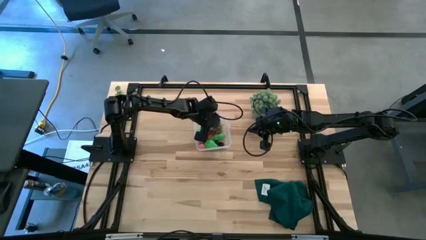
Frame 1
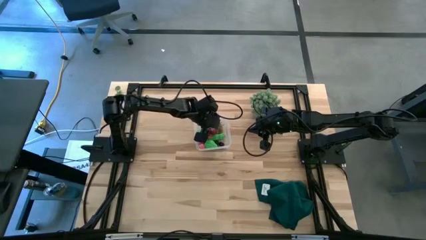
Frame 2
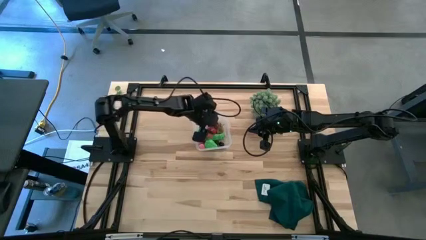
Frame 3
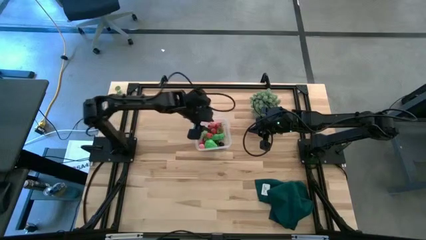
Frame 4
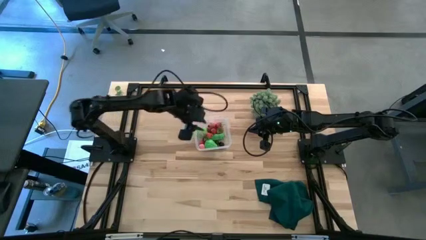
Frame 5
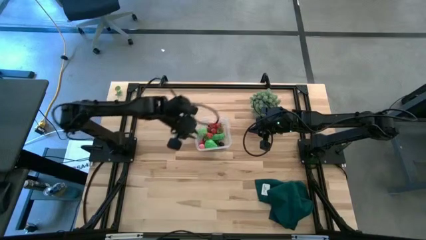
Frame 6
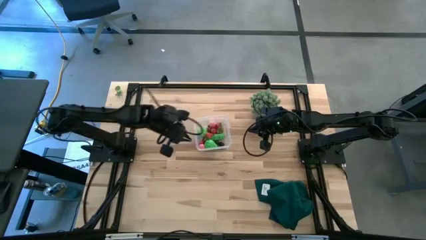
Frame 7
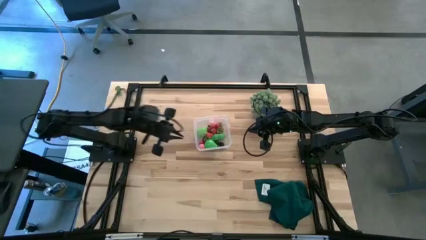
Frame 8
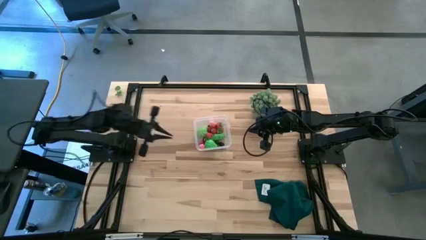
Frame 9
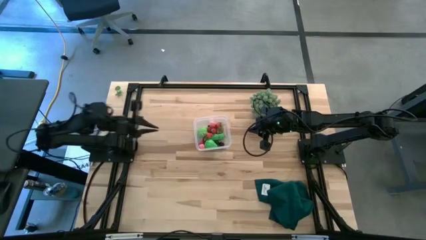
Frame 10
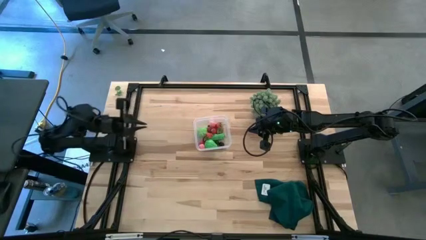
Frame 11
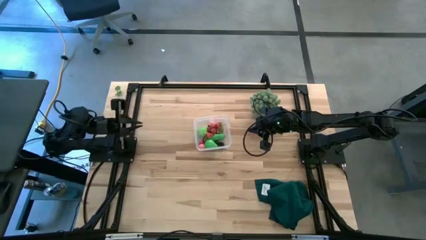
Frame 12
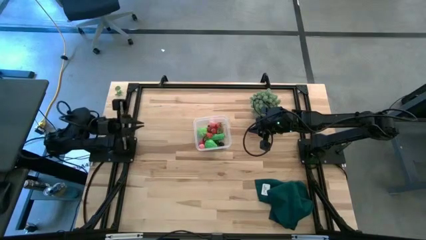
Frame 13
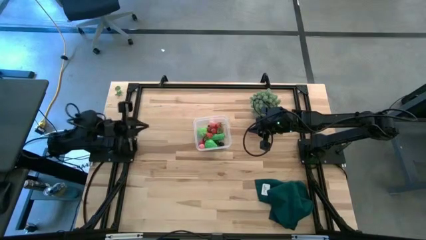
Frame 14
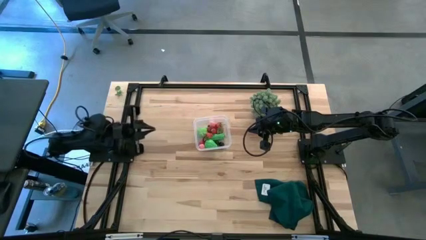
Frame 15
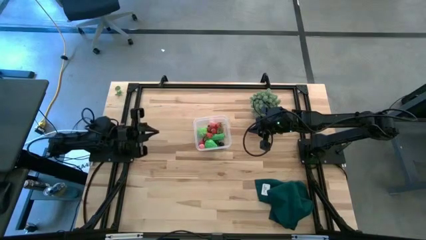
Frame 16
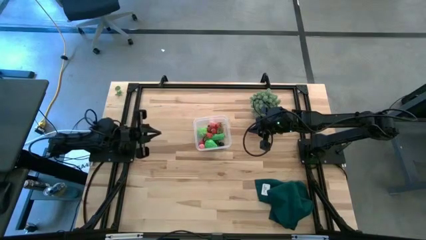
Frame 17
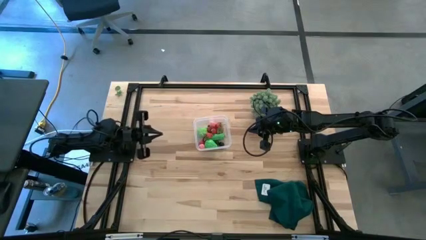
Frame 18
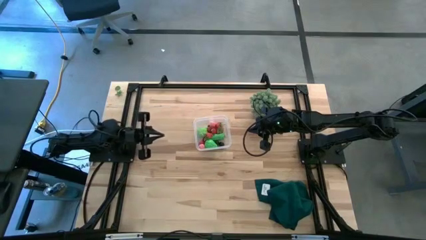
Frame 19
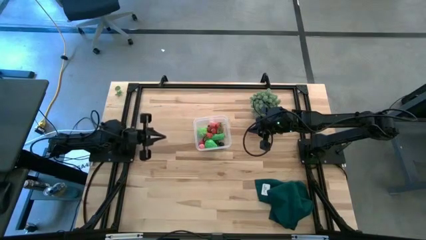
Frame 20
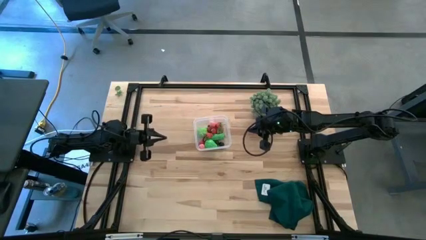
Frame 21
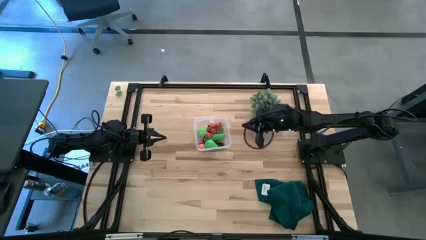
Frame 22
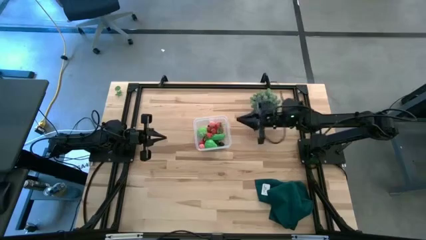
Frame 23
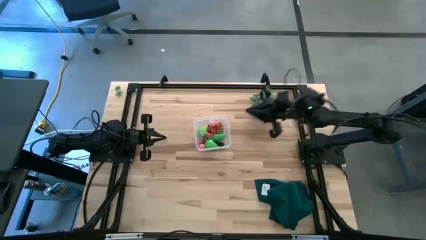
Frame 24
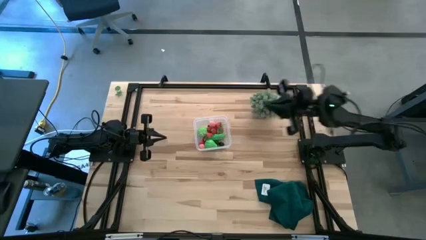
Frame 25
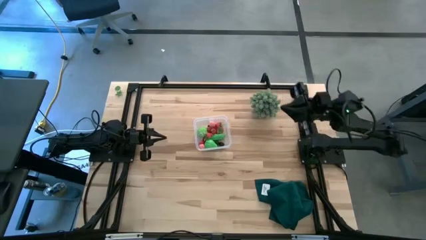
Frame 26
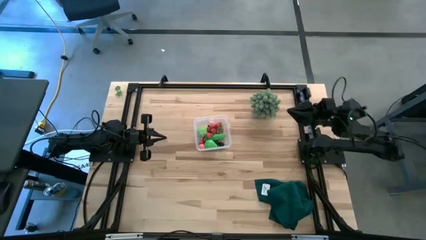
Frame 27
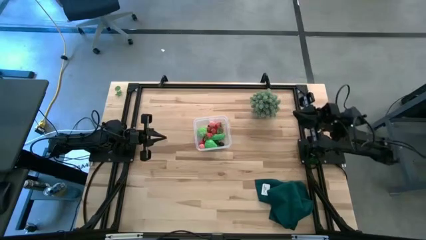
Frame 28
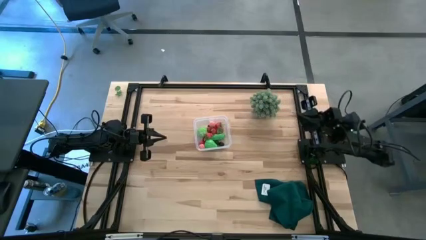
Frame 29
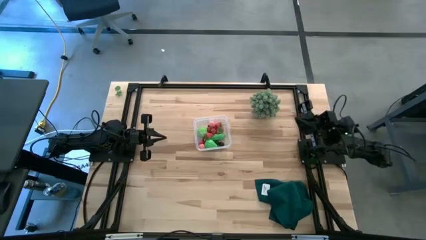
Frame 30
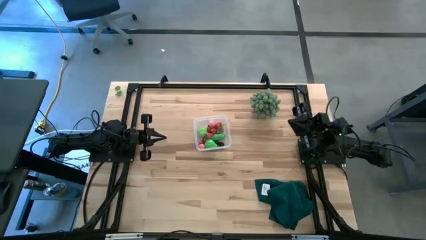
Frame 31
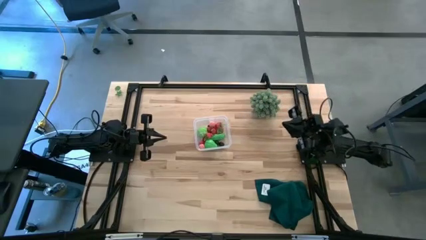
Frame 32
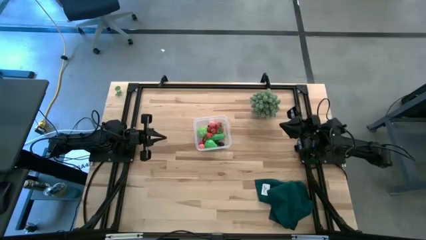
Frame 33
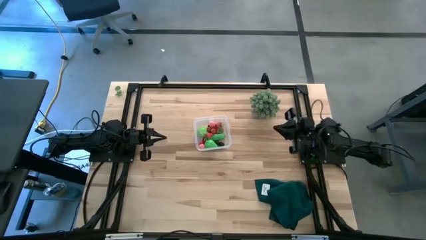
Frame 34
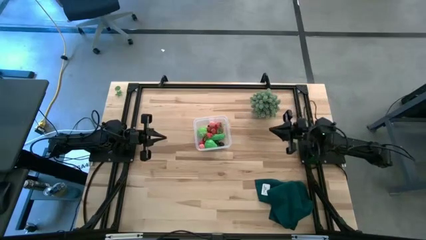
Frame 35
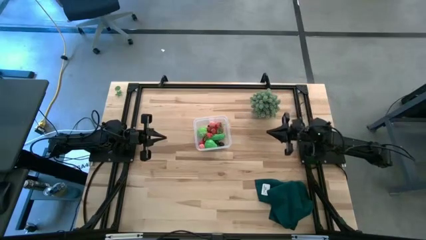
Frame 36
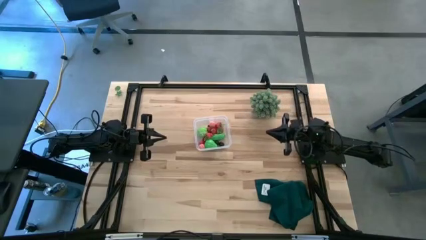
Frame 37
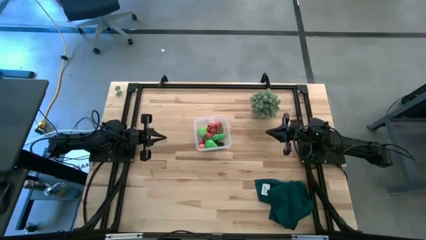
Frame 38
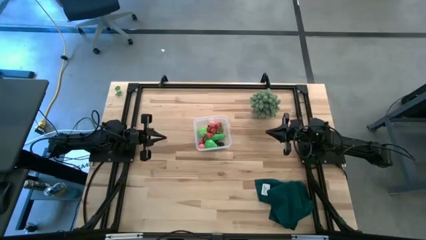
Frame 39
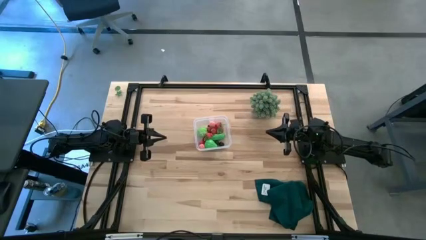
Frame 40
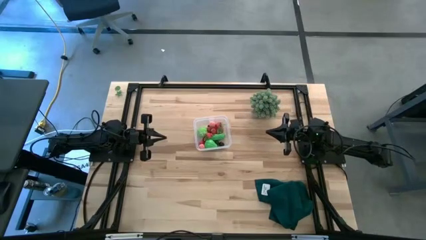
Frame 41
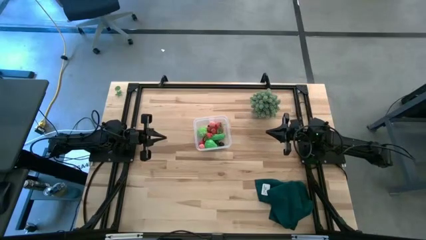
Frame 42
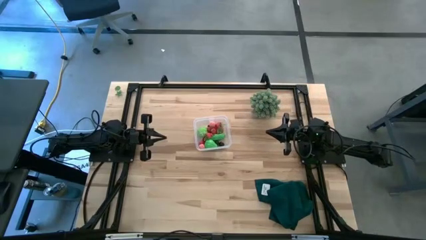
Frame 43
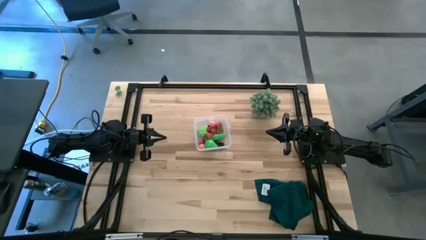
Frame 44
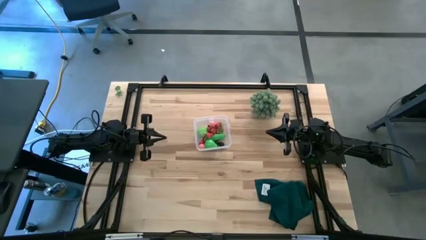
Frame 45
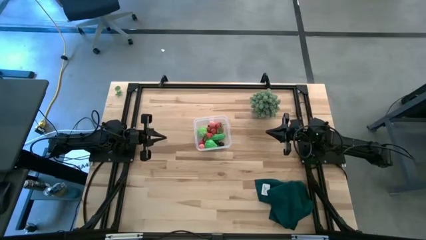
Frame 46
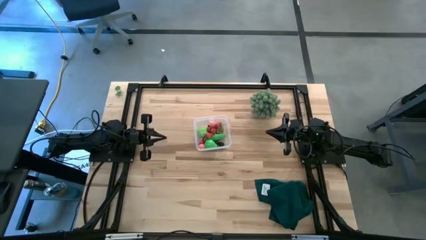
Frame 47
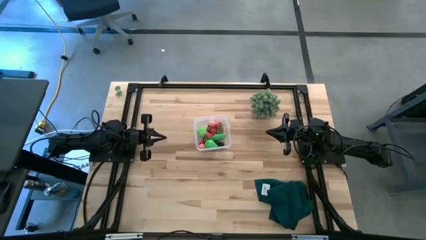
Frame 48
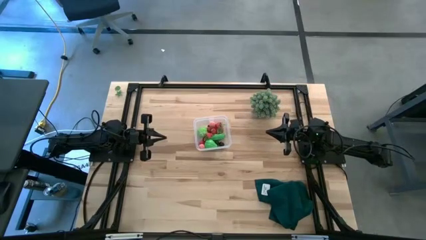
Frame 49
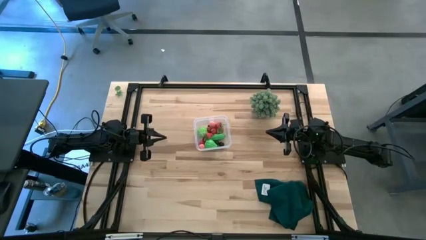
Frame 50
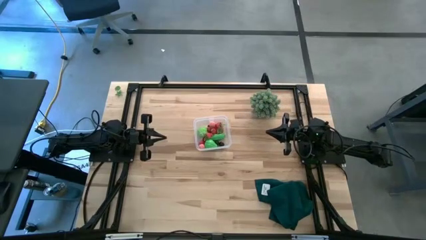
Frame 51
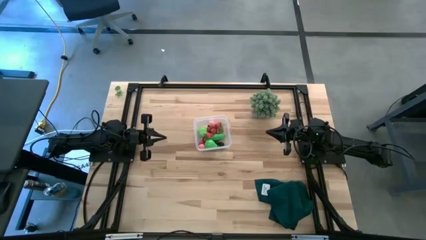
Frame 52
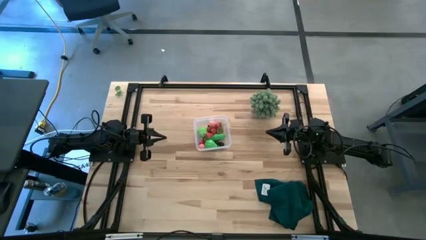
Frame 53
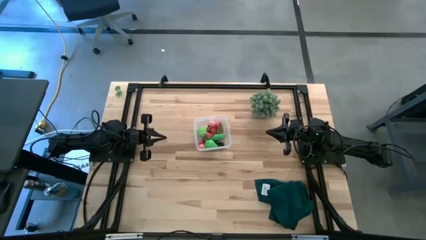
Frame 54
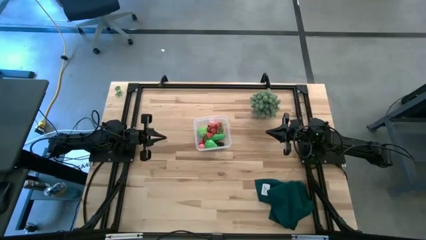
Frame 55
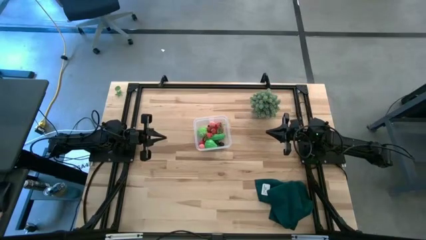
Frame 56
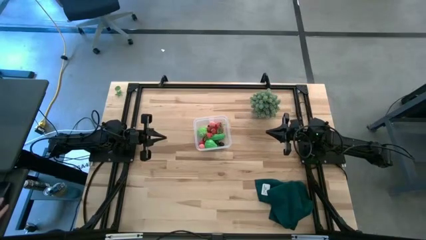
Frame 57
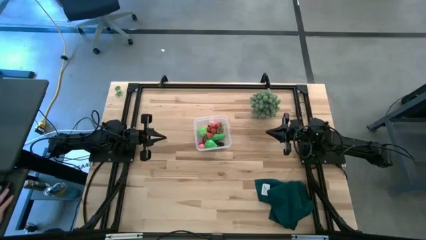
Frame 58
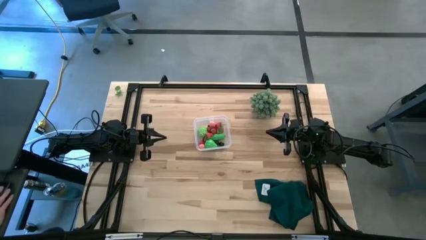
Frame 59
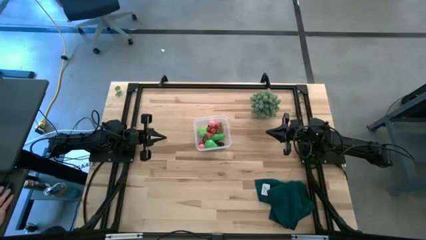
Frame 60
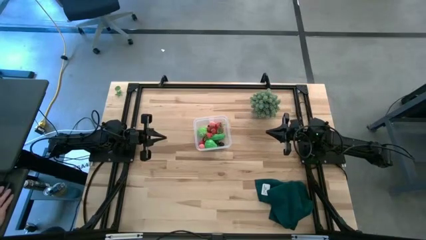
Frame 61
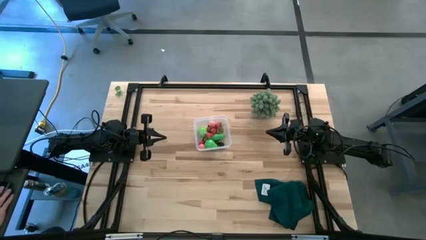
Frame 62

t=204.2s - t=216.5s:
Task: Pick and placing Produce into tupperware
Return to Home Position

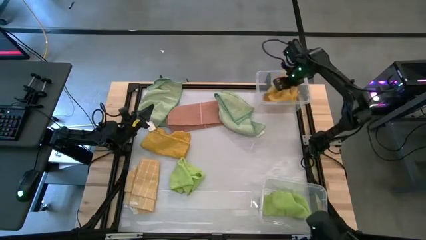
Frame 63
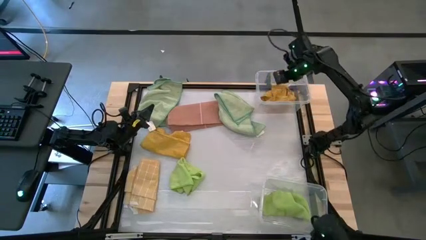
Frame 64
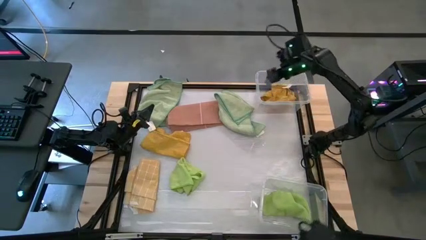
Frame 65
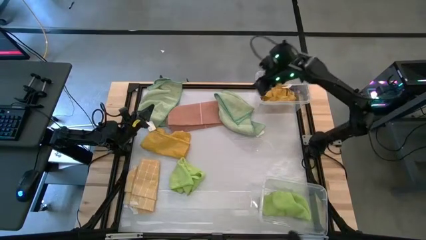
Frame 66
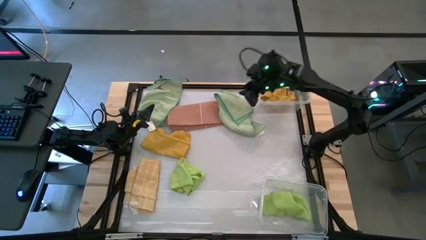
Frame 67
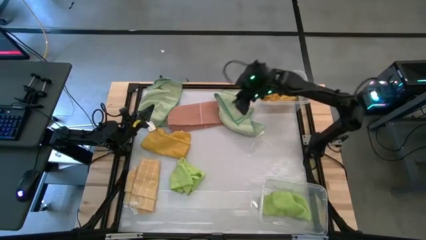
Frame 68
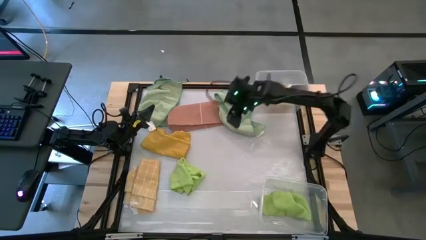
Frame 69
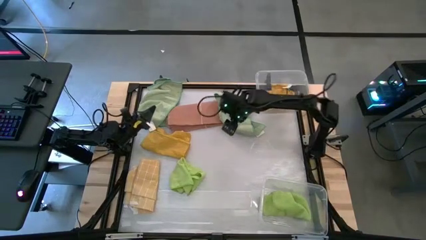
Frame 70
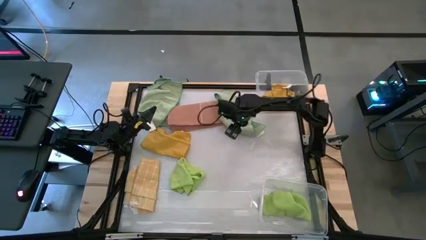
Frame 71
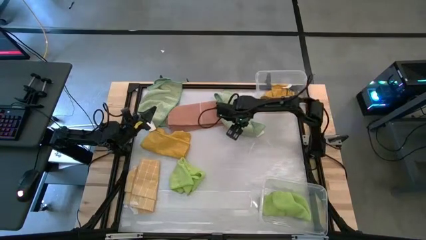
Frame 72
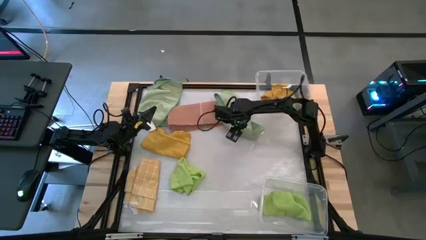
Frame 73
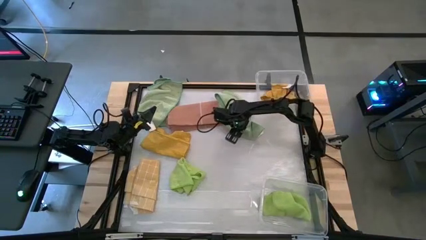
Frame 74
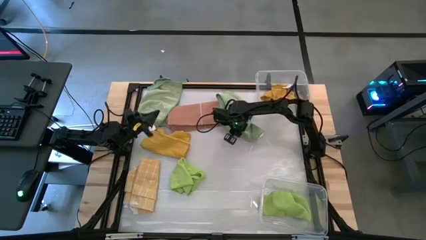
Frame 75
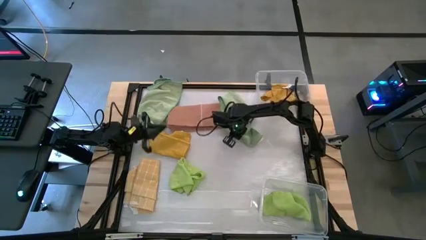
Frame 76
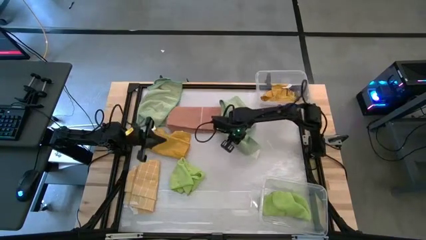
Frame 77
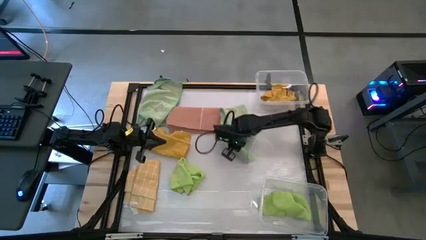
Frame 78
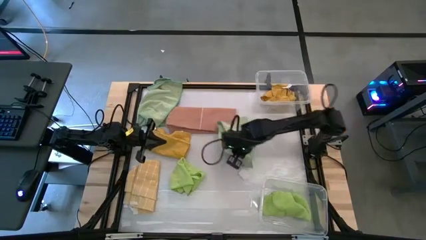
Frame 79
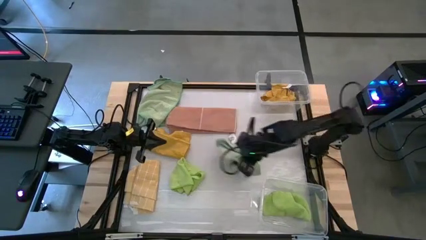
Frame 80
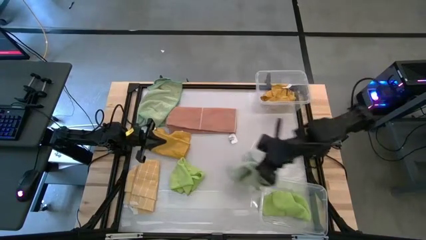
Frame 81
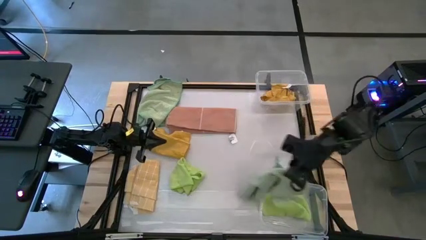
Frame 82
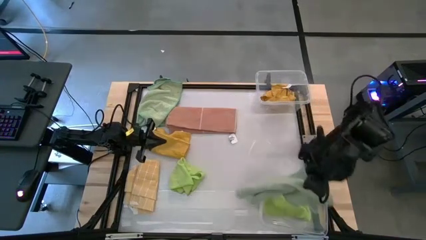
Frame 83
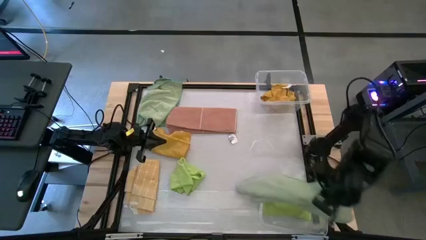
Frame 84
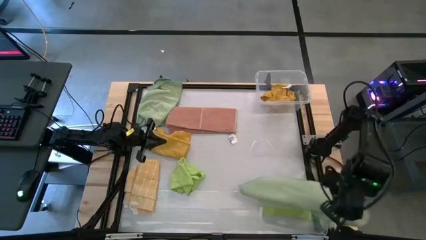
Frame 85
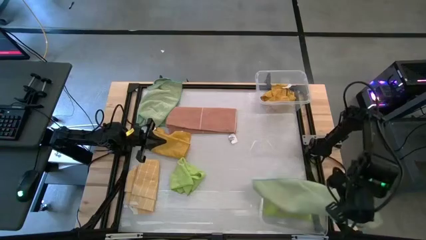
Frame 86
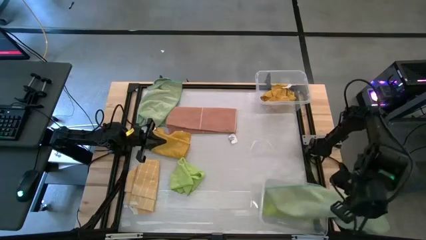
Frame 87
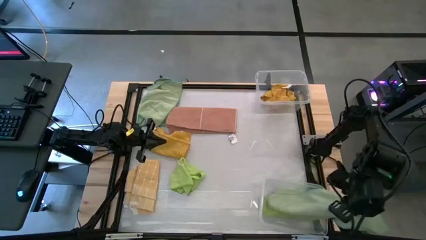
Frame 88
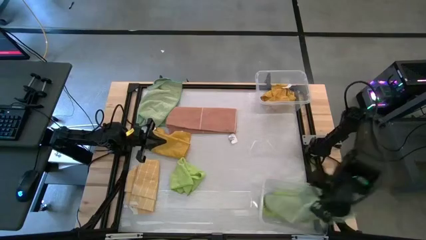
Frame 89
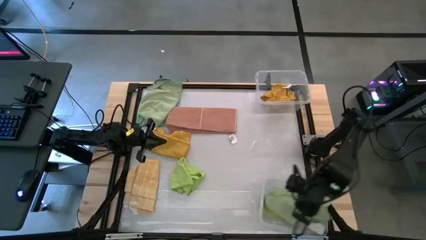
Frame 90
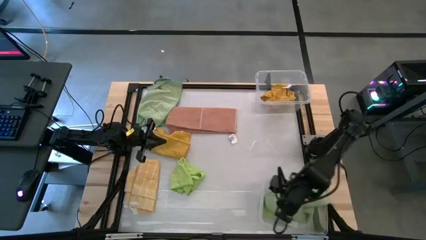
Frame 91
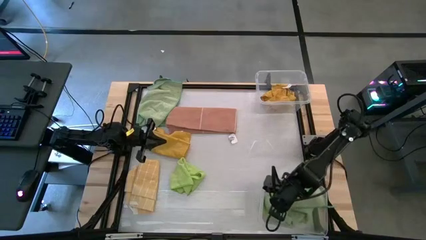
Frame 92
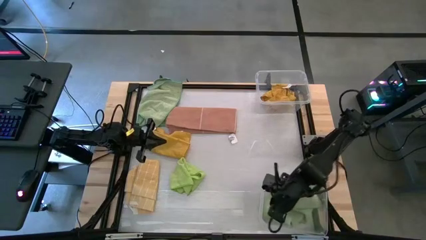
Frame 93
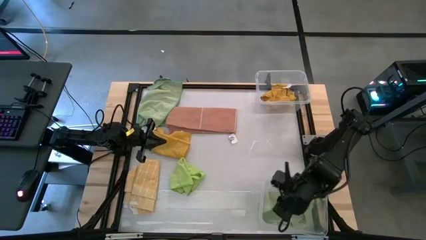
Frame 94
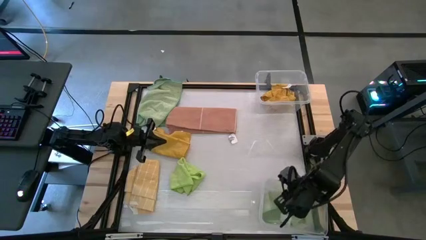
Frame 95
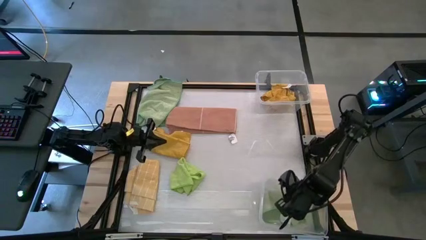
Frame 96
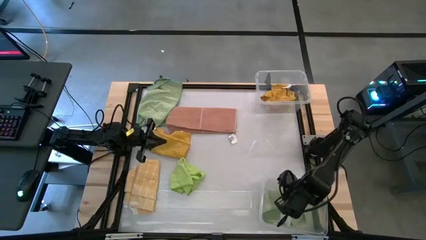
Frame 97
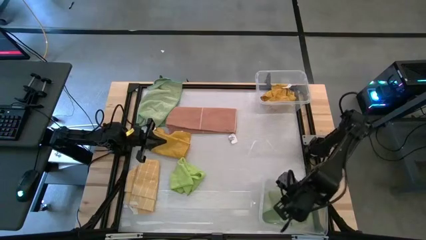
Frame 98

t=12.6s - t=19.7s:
Task: Sort microfiber towel by color & place in baskets
Put the light green microfiber towel into the bottom transparent bin
